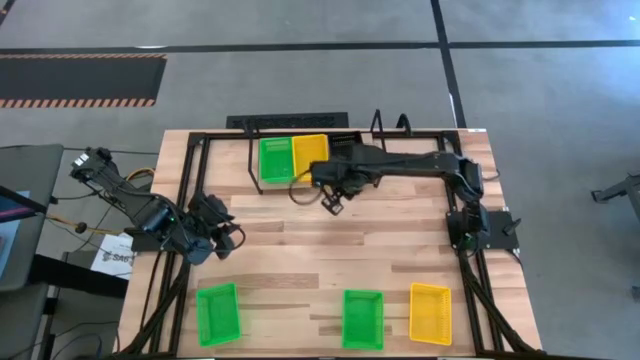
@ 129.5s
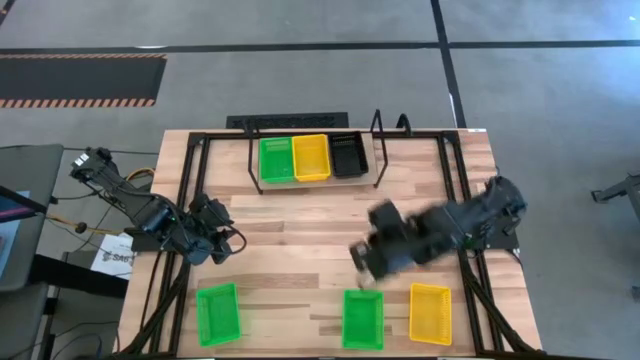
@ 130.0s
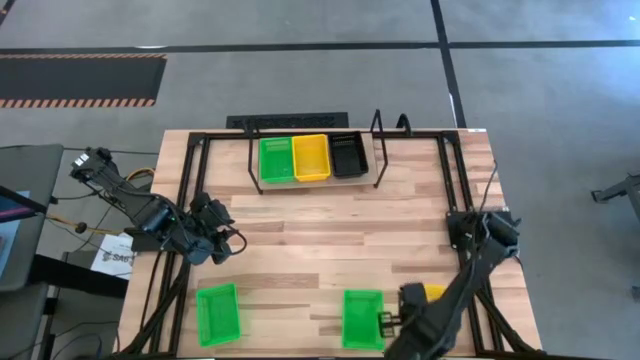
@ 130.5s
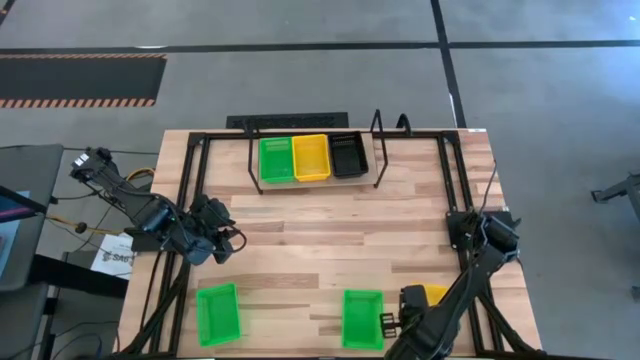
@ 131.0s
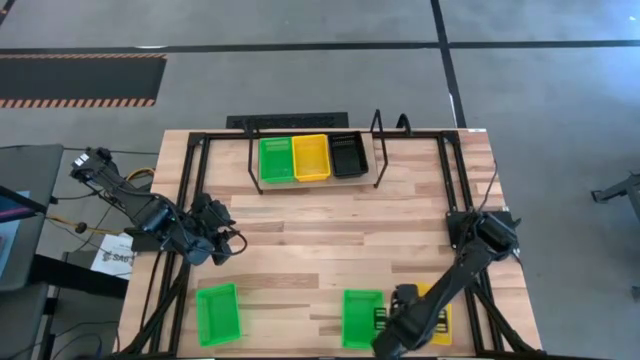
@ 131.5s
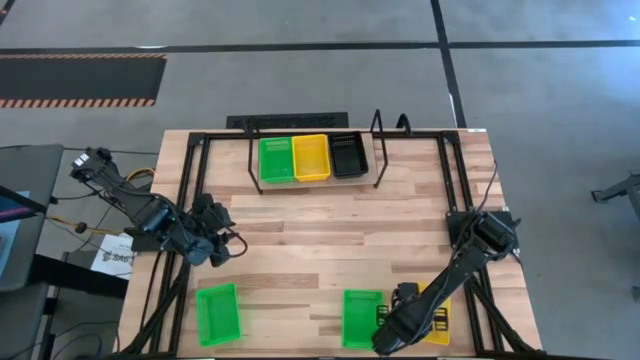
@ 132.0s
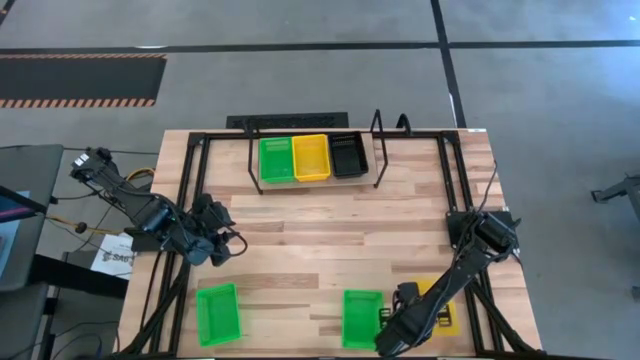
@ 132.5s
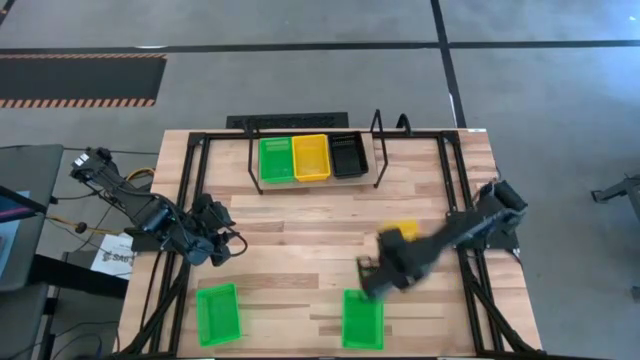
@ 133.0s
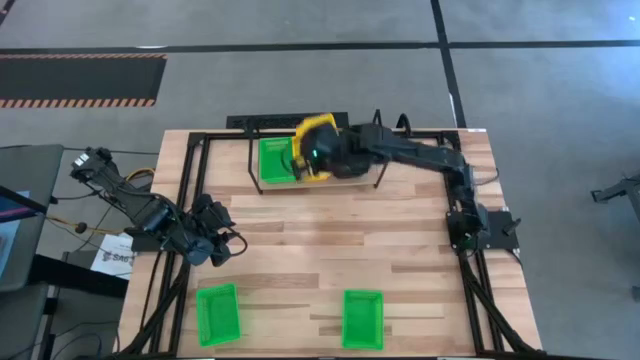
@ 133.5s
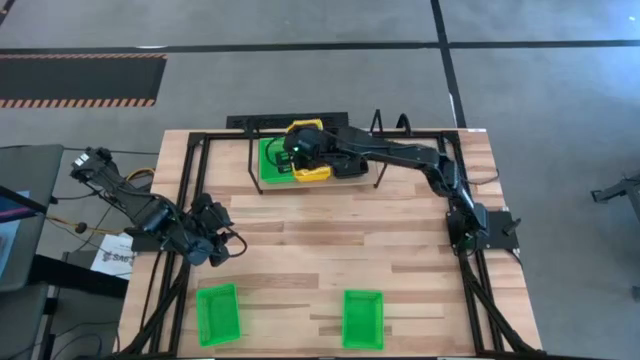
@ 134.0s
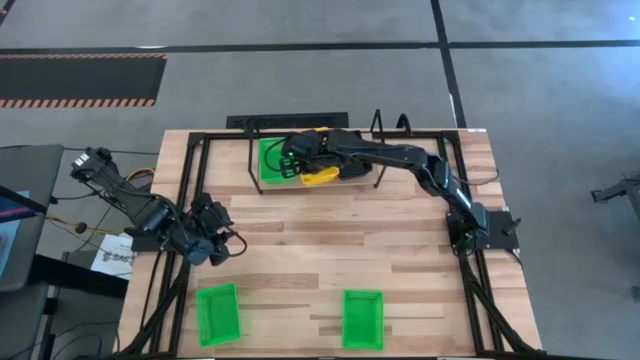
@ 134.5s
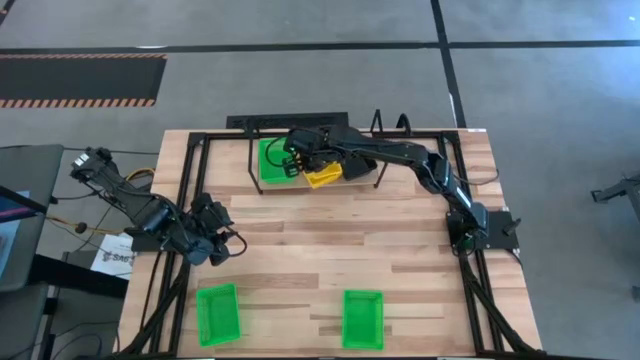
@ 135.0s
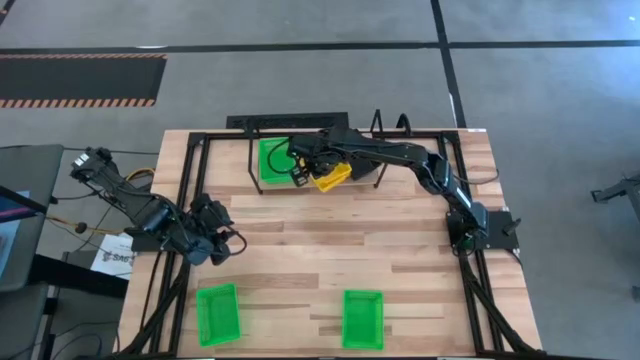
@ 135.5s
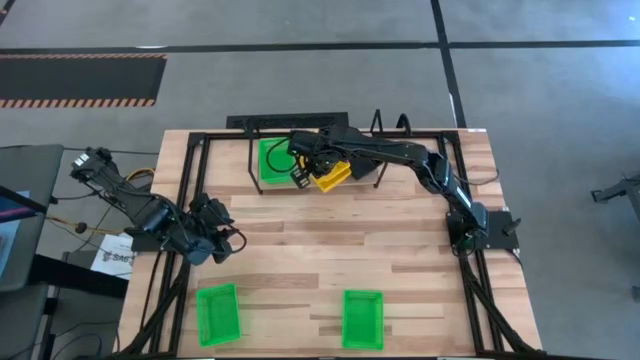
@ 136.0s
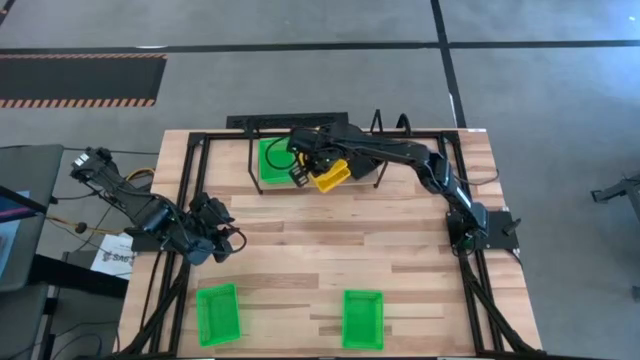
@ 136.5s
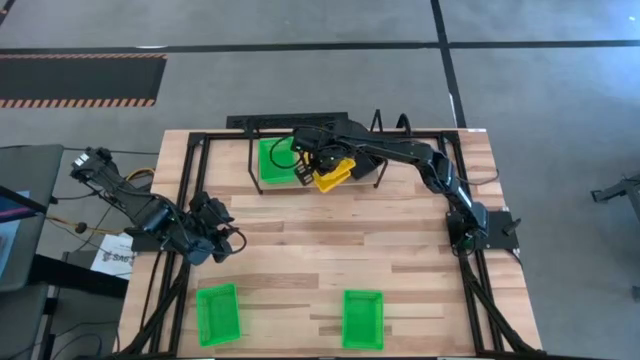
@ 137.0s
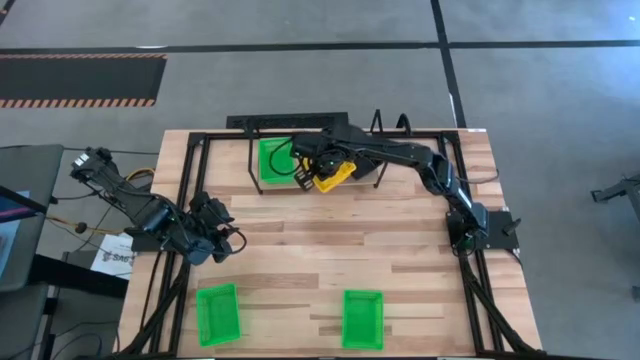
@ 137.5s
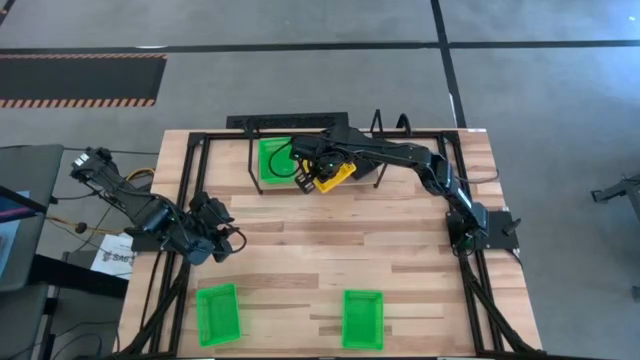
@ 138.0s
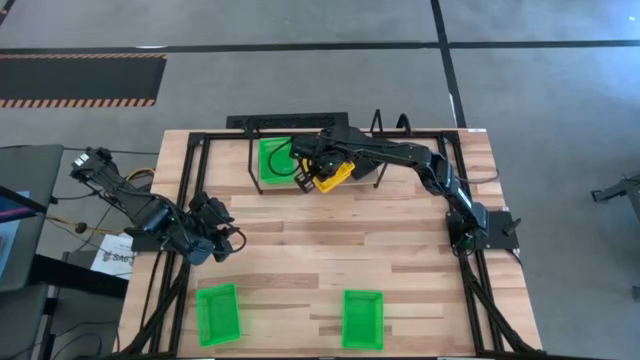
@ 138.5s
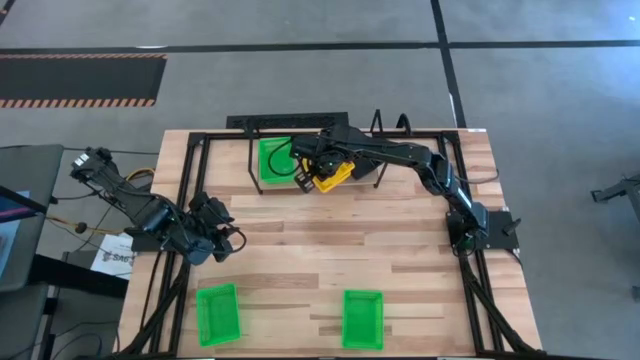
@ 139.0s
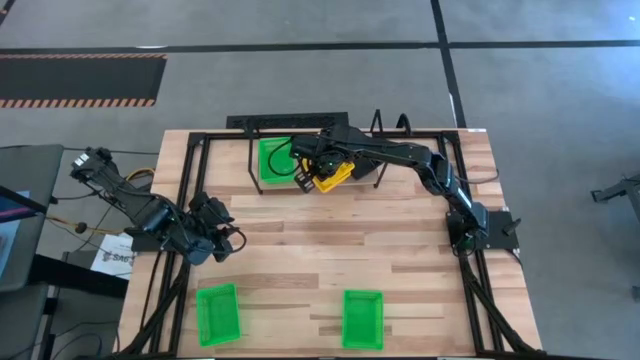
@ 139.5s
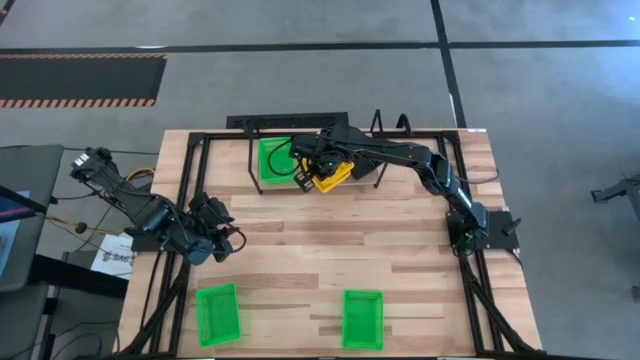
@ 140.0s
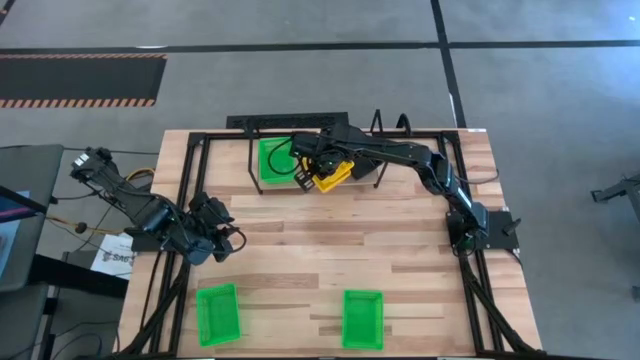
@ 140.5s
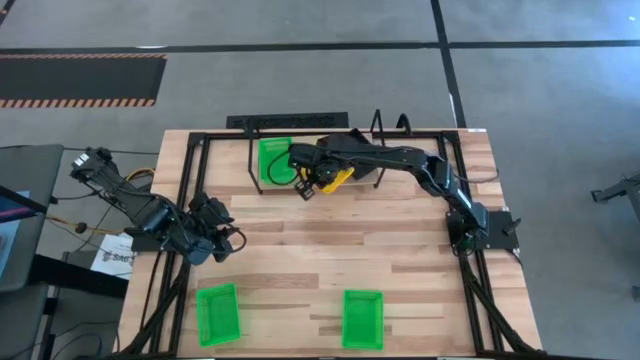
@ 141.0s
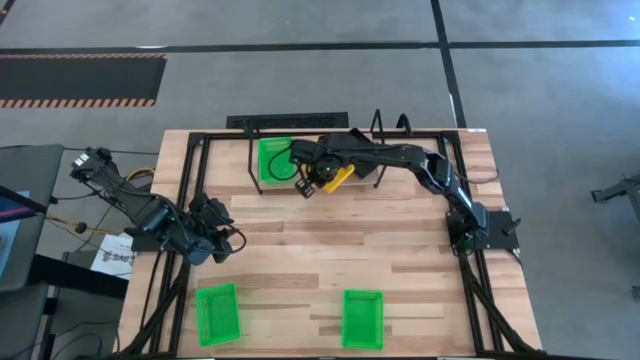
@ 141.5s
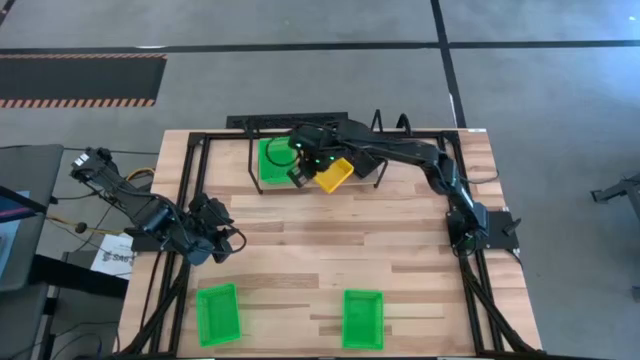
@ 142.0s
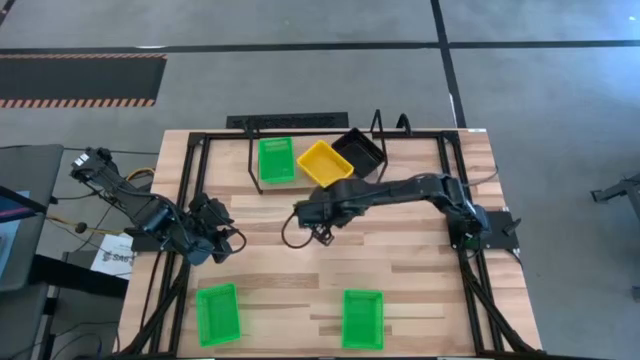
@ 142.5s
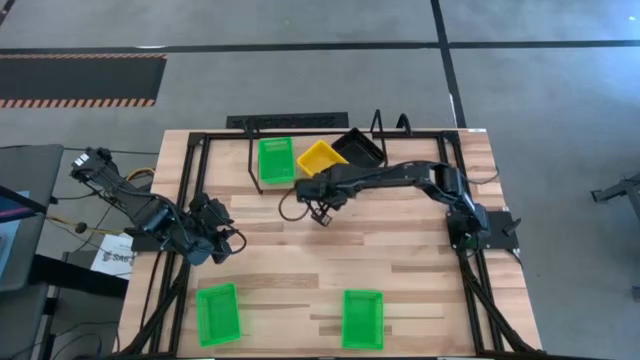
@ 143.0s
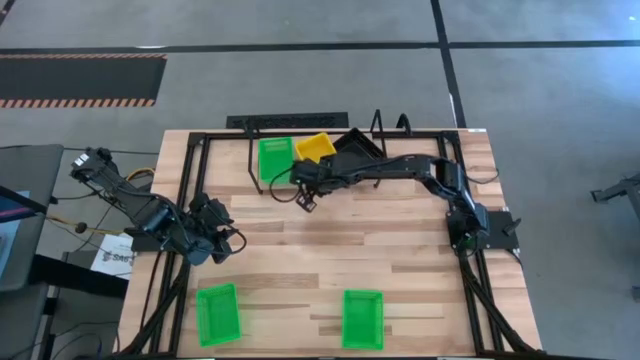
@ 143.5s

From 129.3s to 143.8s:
Task: Stack baskets on shelf by color
Stack the yellow bin on top of the yellow bins on the shelf

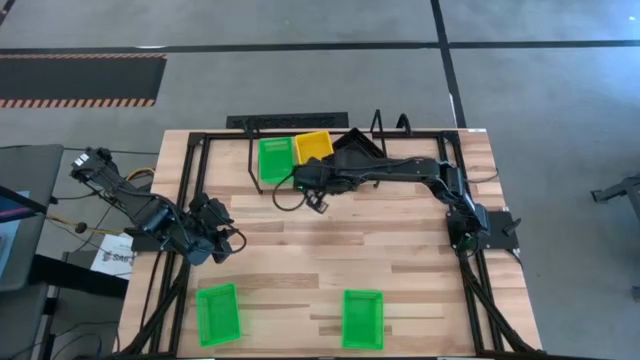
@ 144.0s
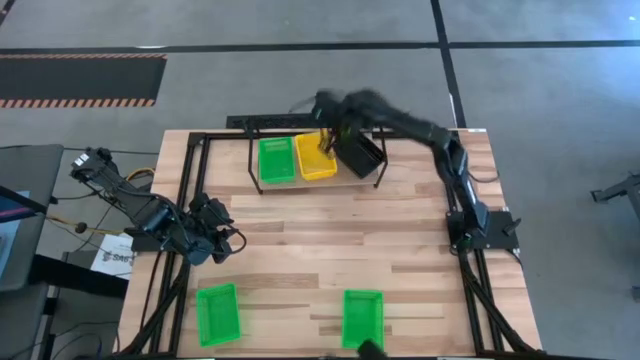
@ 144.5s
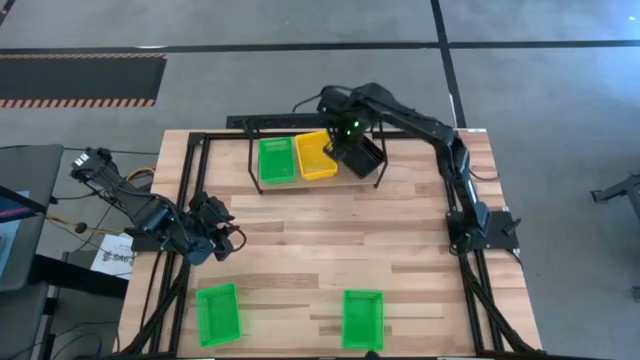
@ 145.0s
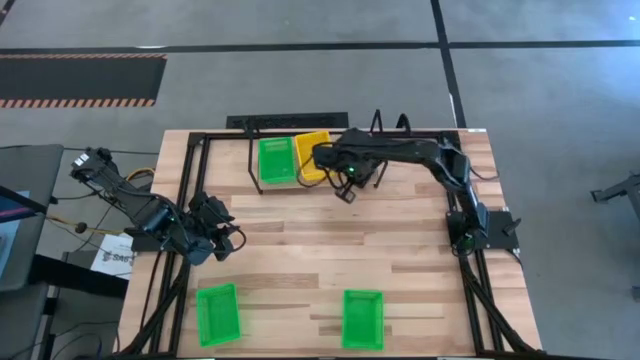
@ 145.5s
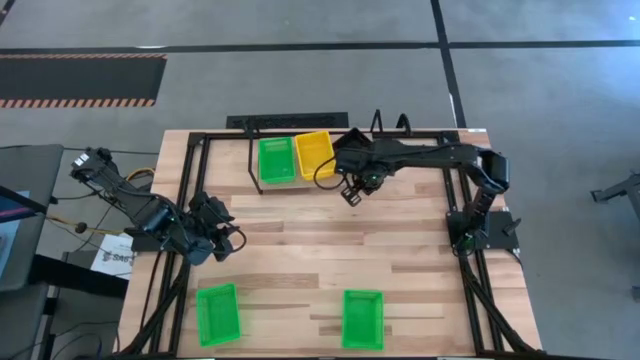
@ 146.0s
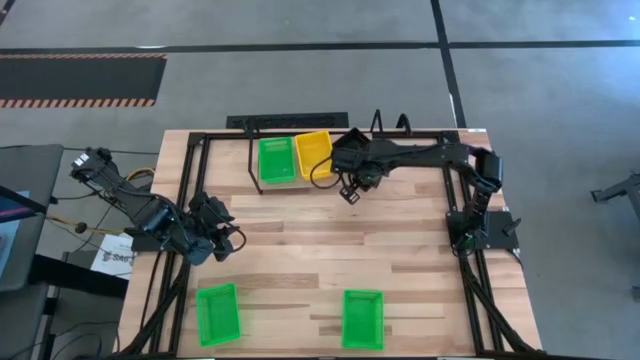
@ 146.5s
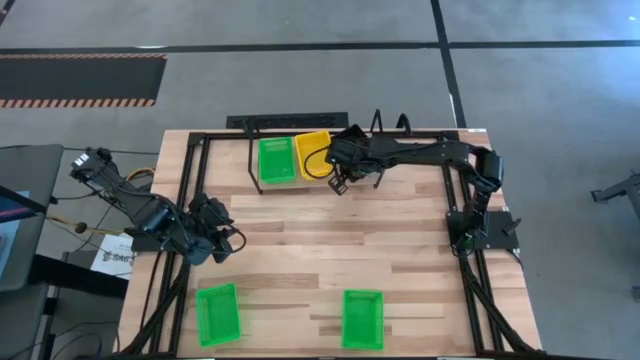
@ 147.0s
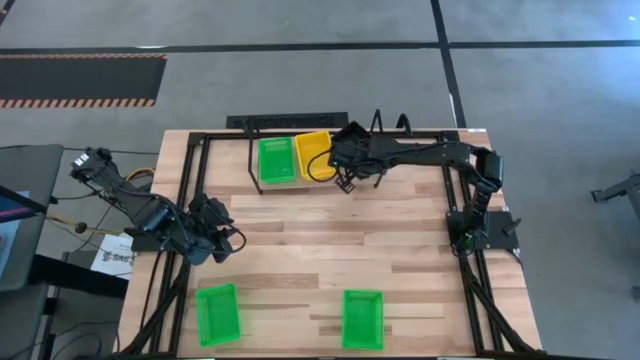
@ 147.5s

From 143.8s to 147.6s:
Adjust the stacked black bins on the shelf

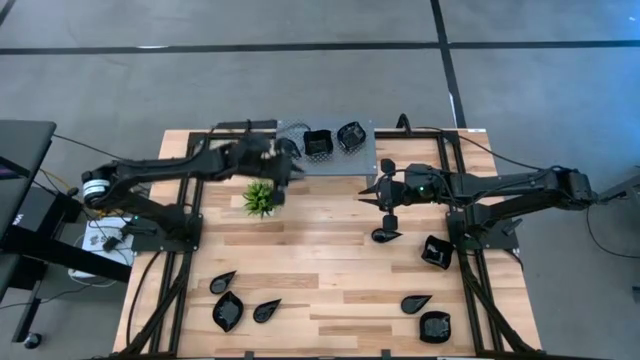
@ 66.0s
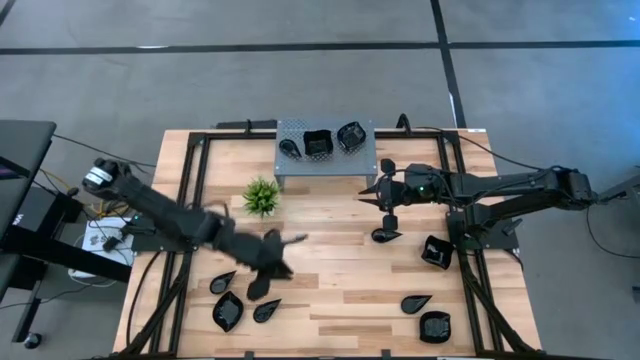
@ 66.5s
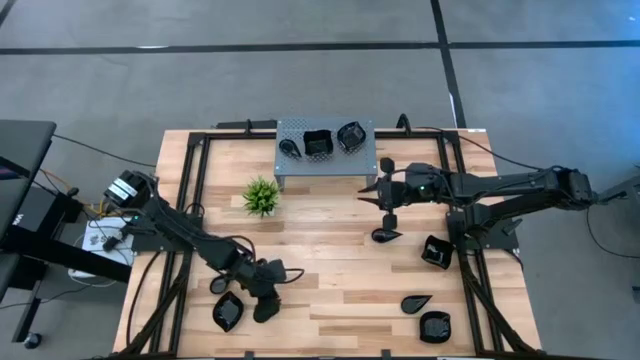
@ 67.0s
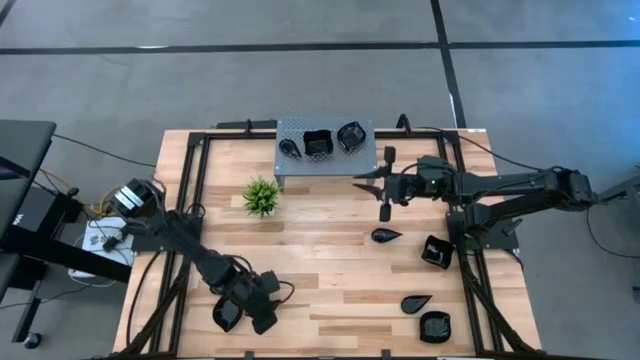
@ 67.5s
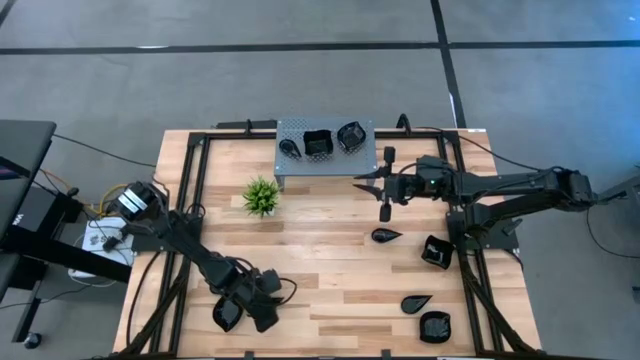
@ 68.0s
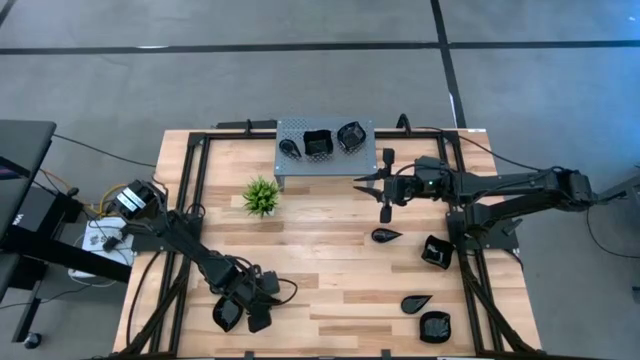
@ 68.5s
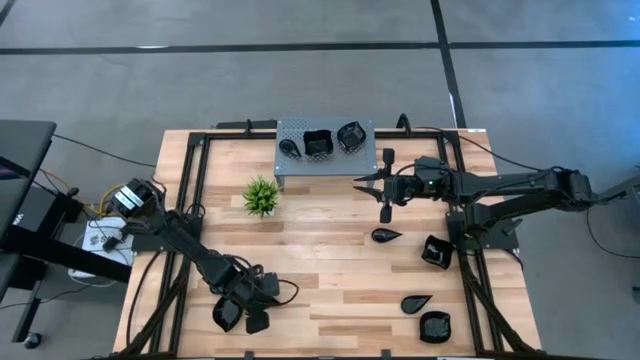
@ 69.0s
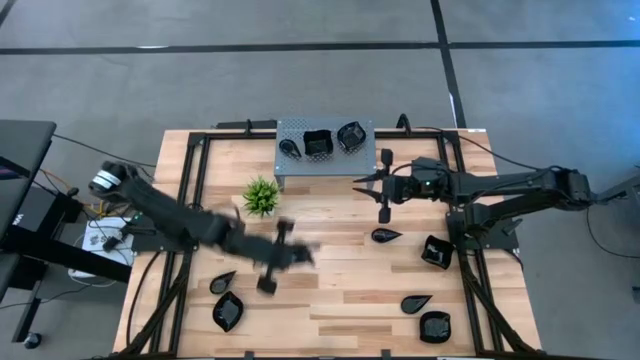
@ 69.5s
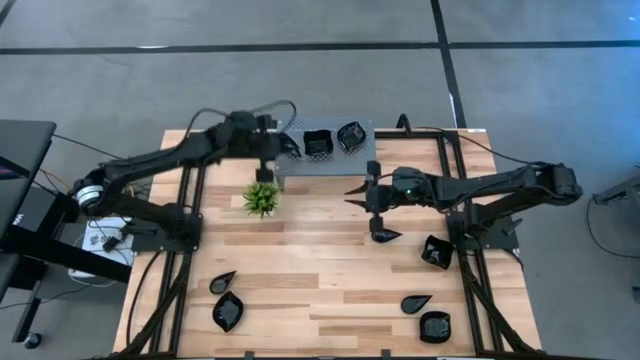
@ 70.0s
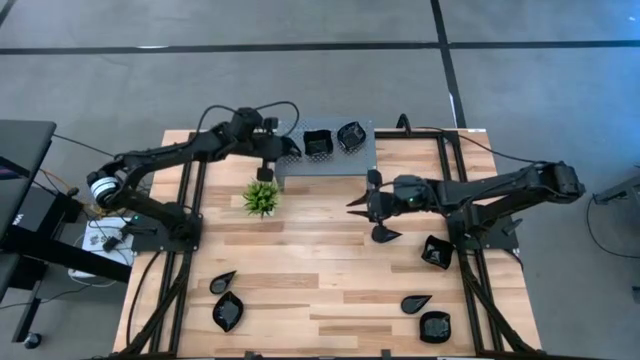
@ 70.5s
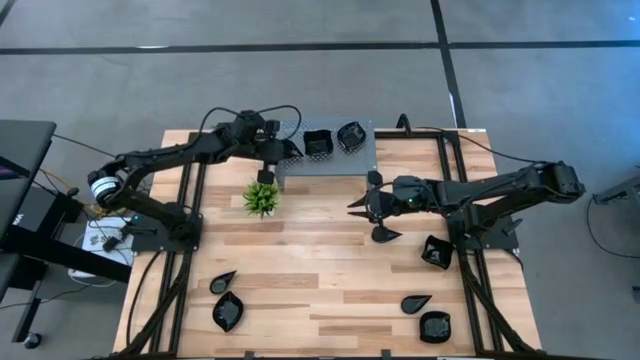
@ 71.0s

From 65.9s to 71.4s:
Task: Pick & Place Mini shaped plates
Stack the black drop-shaped plate on top of the black drop-shaped plate on the shelf
